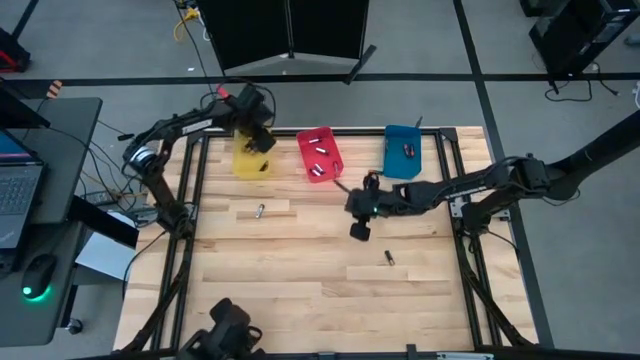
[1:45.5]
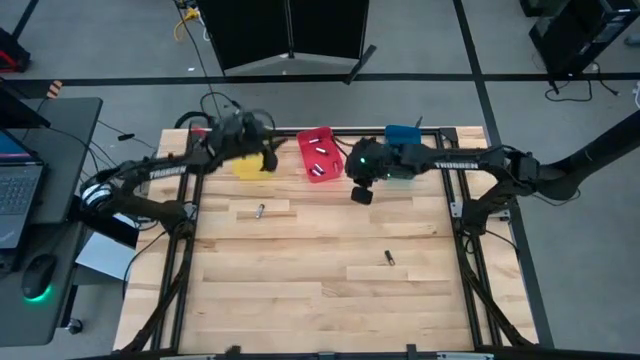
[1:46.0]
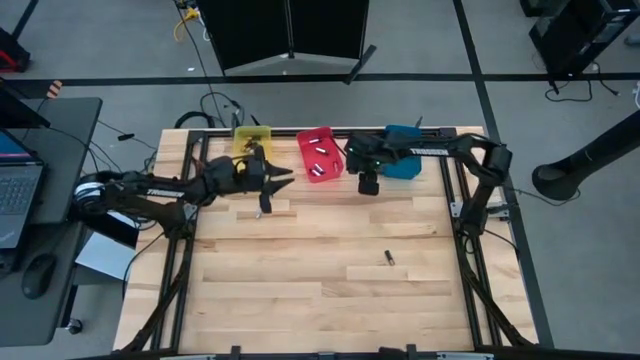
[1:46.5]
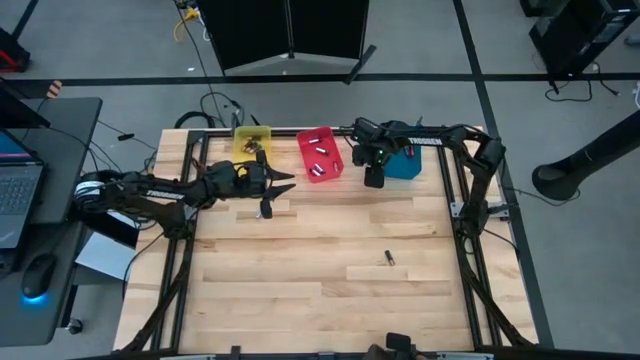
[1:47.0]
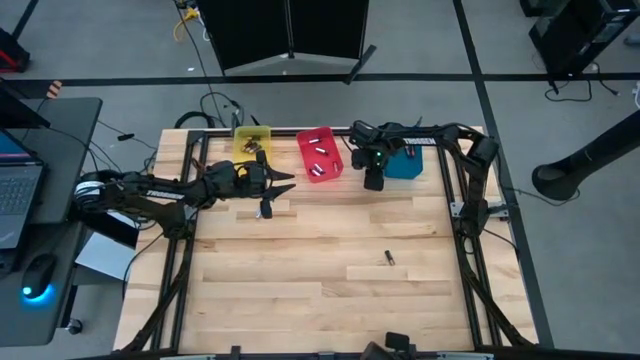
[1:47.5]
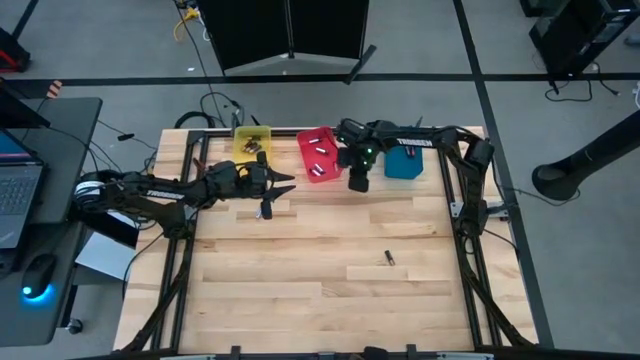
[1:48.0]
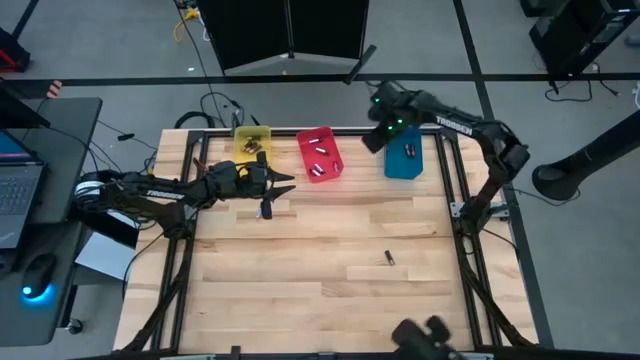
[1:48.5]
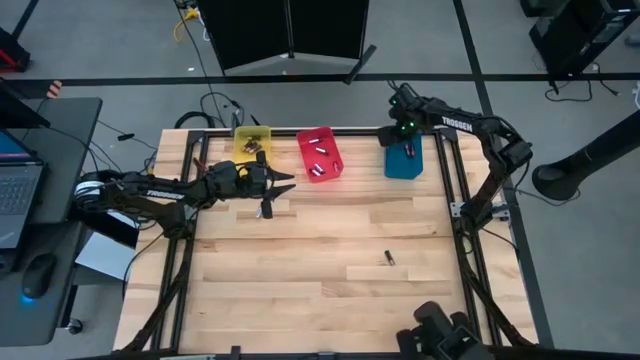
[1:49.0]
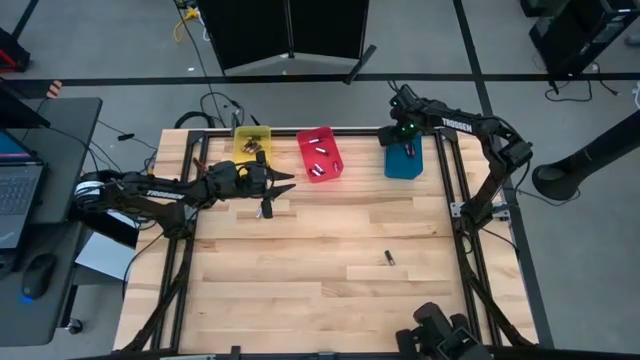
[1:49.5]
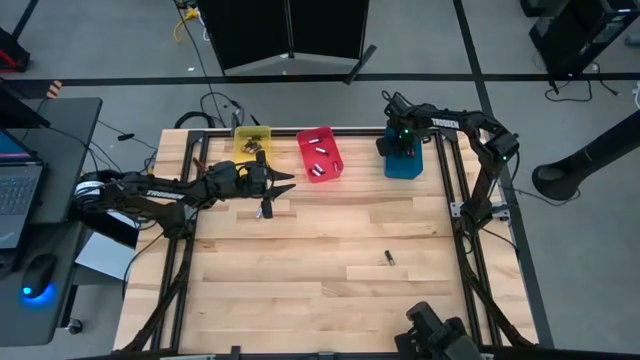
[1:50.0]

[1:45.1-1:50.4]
Task: Sort batteries
Put the orange battery into the blue bin

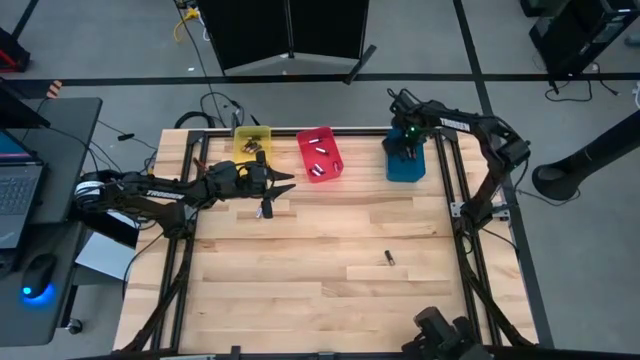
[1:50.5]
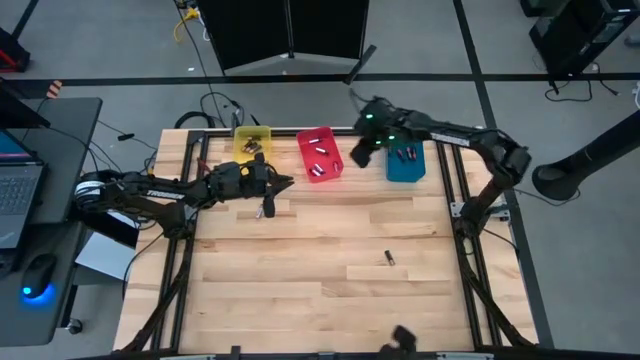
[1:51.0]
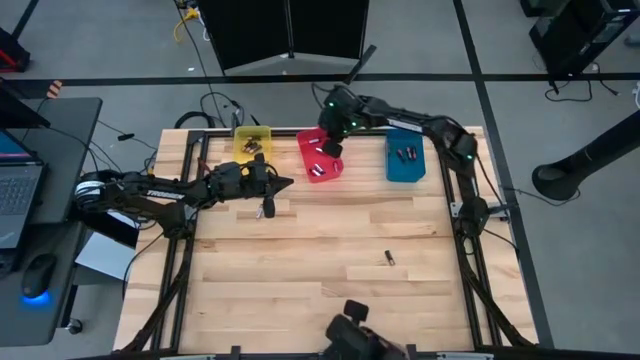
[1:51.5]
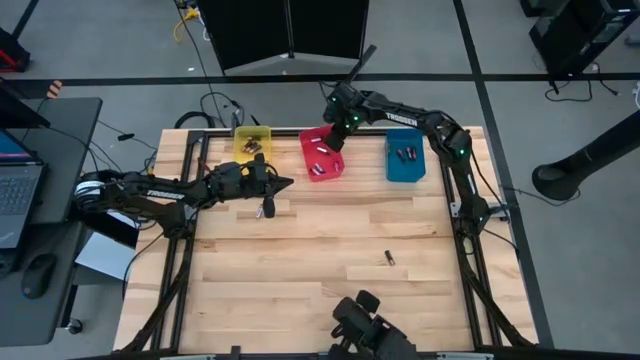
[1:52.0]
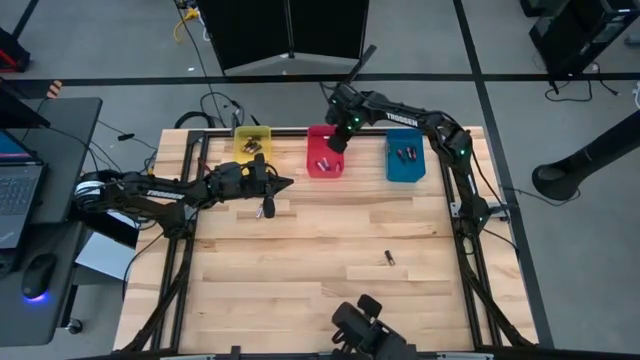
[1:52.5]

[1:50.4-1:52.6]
Adjust the red bin

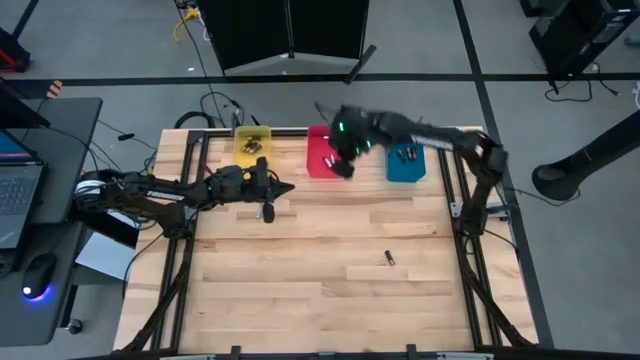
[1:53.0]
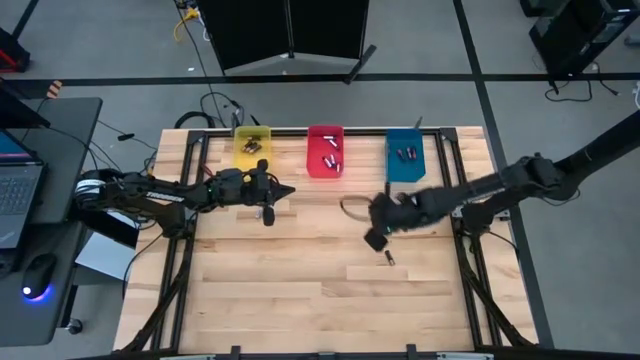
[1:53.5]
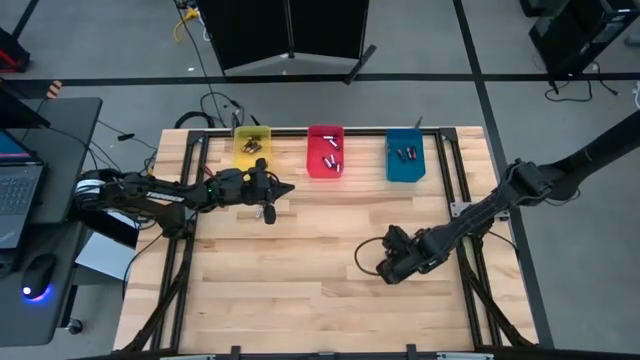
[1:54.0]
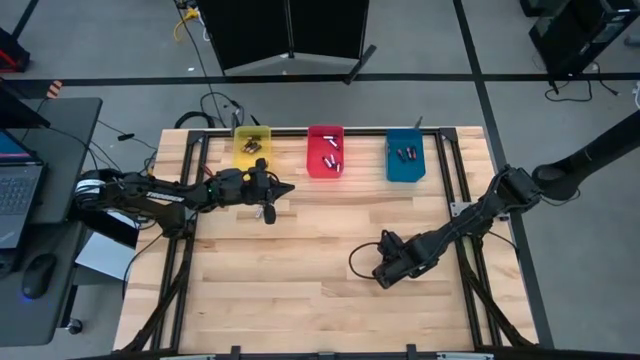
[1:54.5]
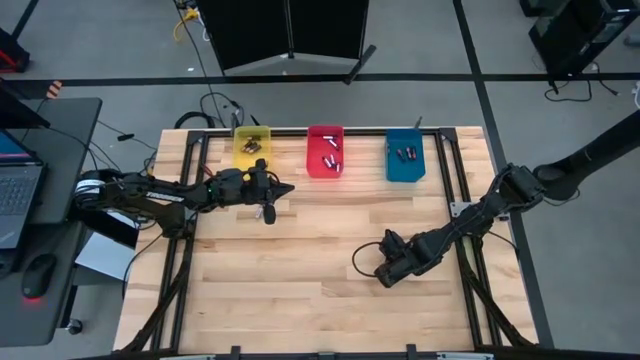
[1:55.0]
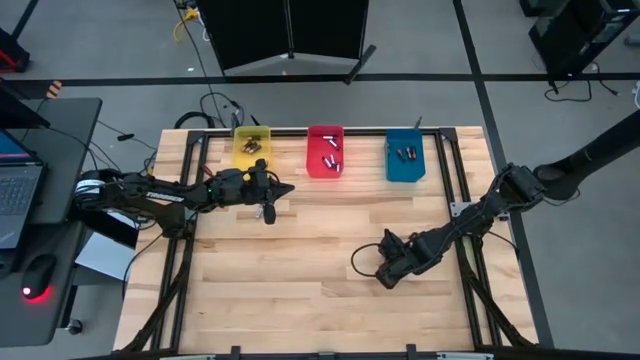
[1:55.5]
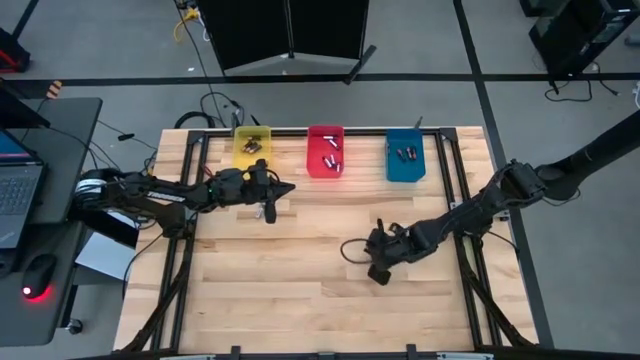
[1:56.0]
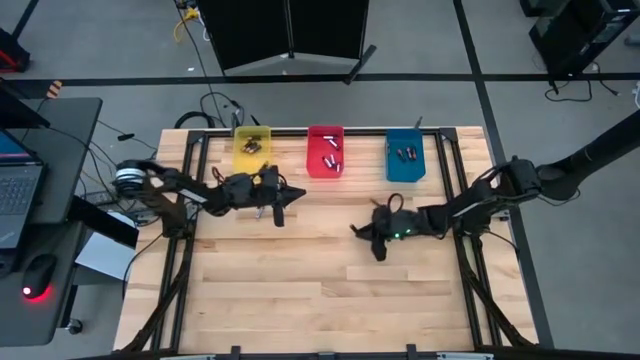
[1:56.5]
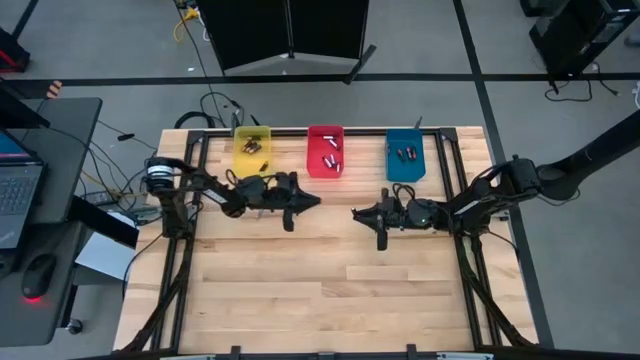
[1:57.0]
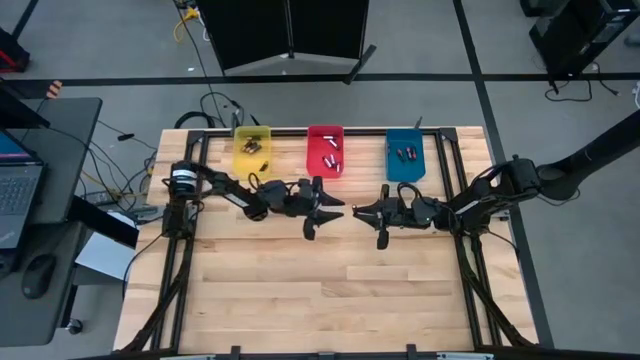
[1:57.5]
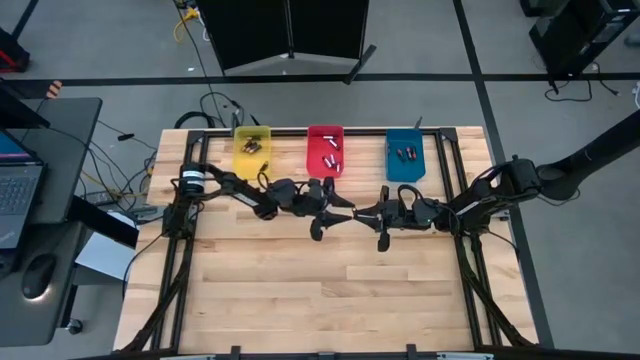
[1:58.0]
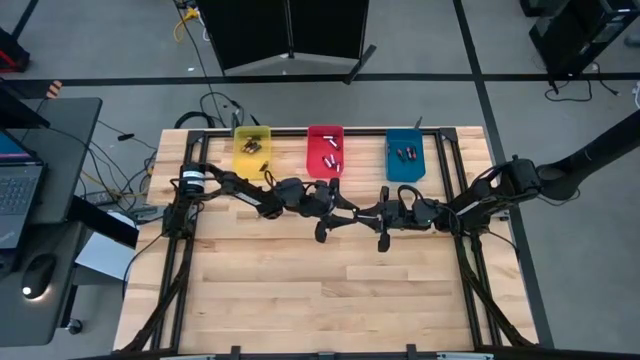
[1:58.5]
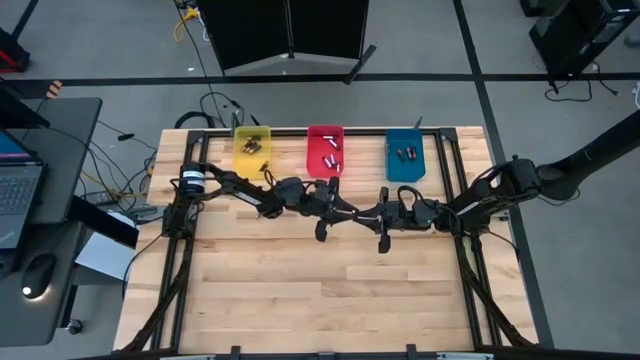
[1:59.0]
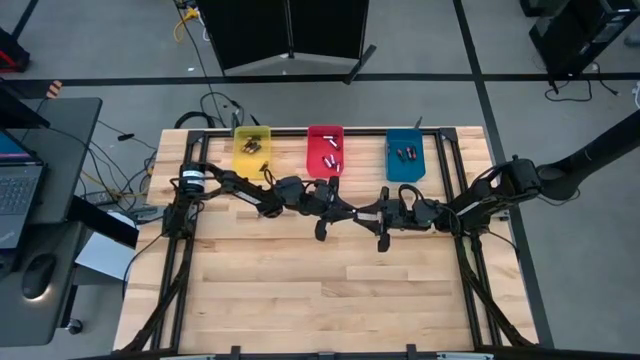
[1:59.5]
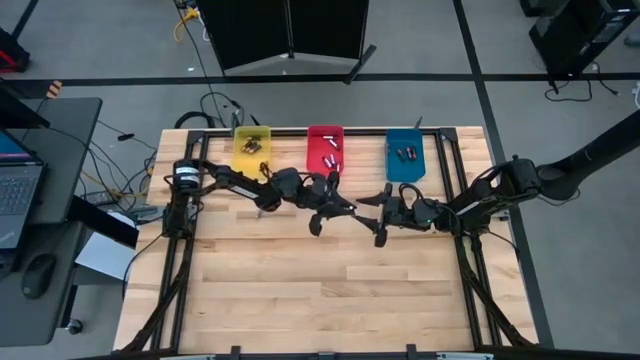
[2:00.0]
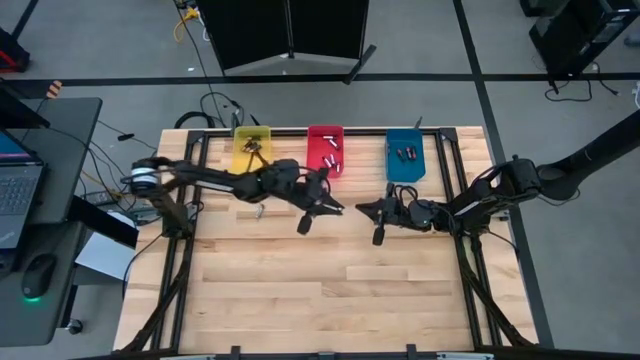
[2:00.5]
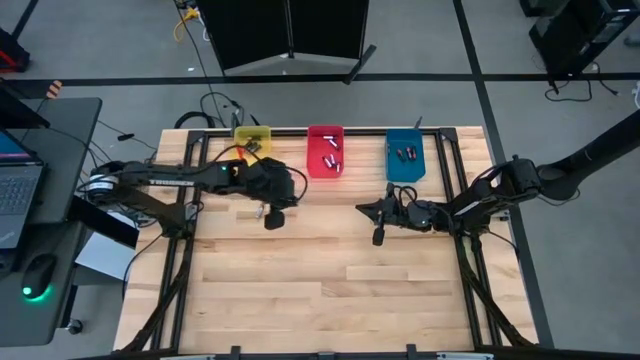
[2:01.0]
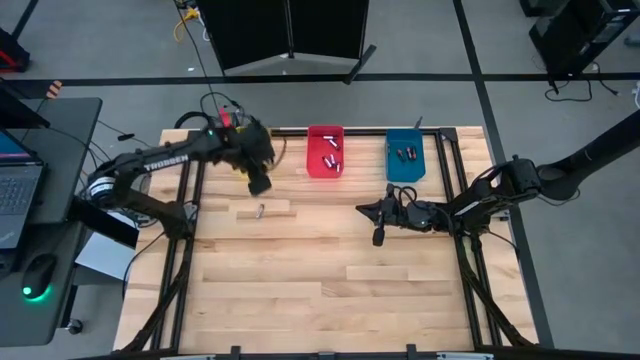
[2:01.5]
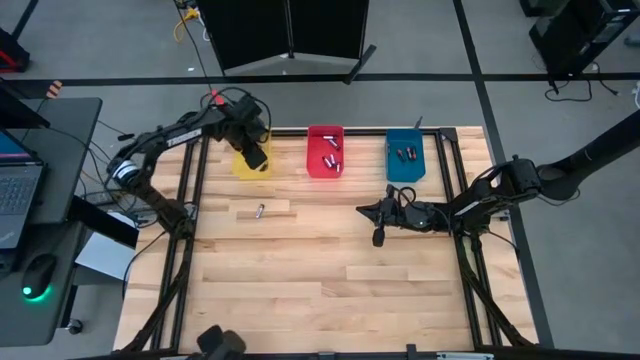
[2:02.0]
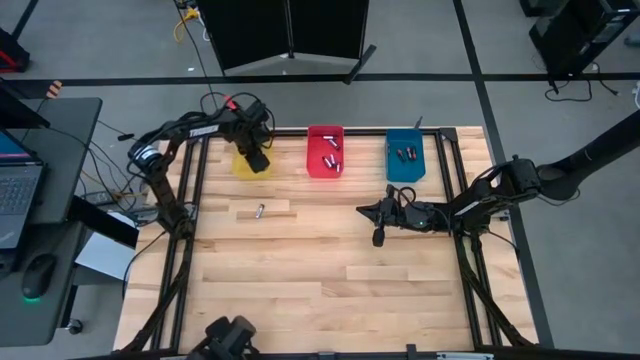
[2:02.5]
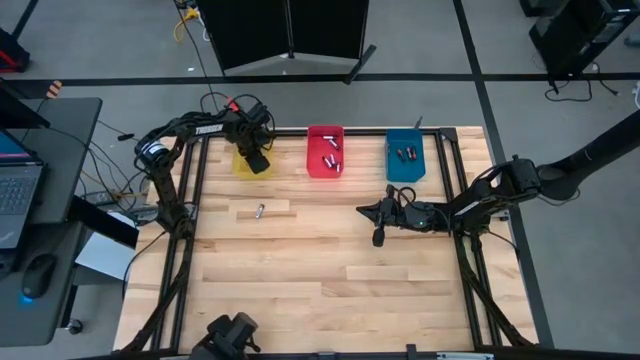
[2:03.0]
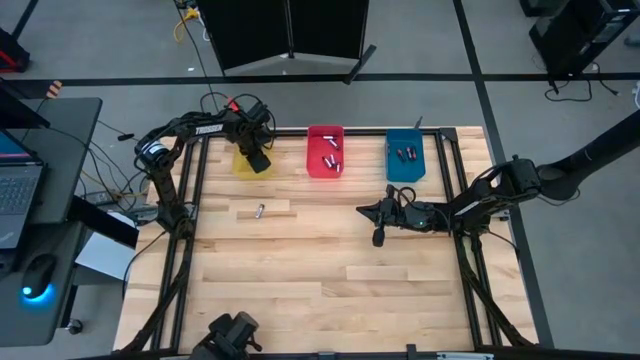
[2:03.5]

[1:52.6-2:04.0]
Put the brown battery into the yellow bin

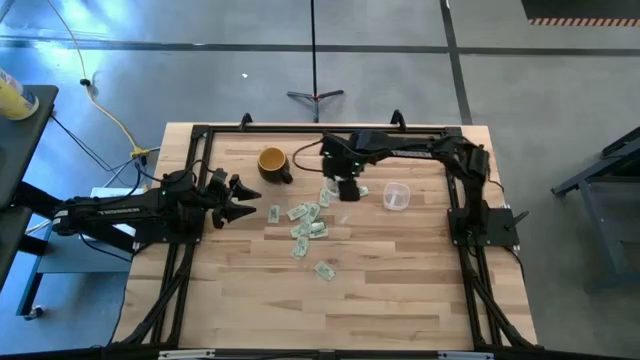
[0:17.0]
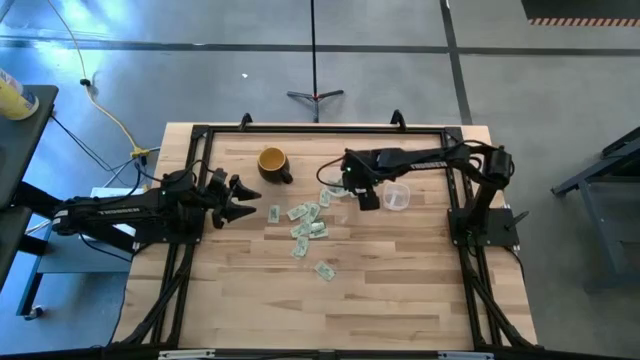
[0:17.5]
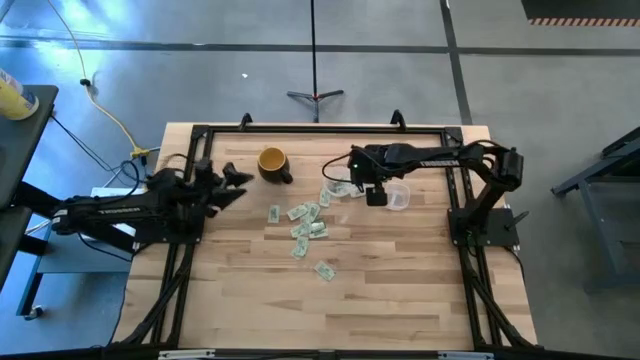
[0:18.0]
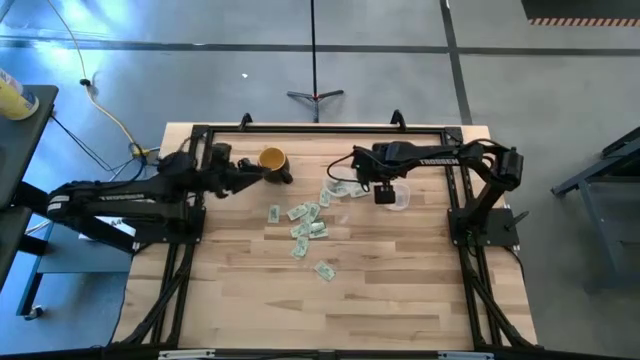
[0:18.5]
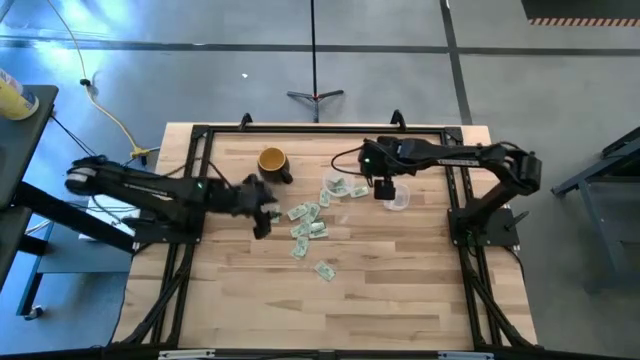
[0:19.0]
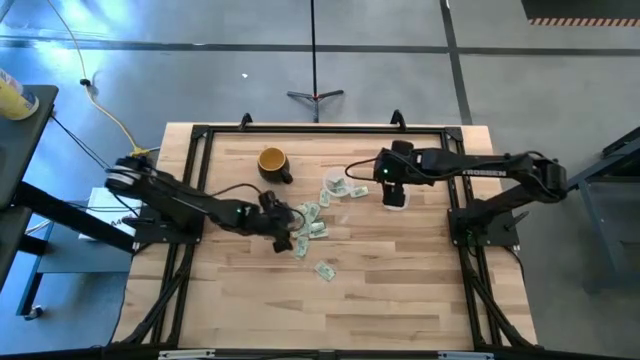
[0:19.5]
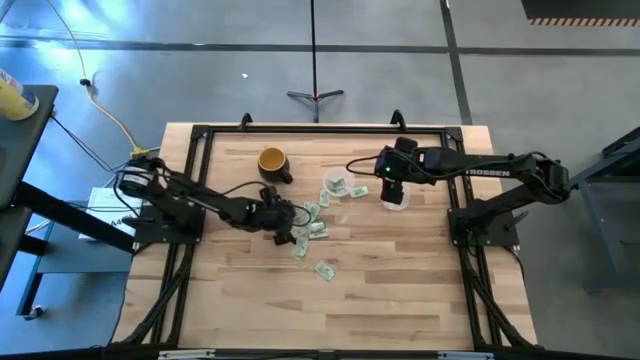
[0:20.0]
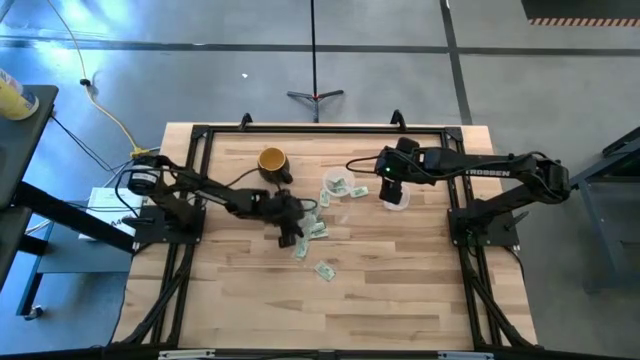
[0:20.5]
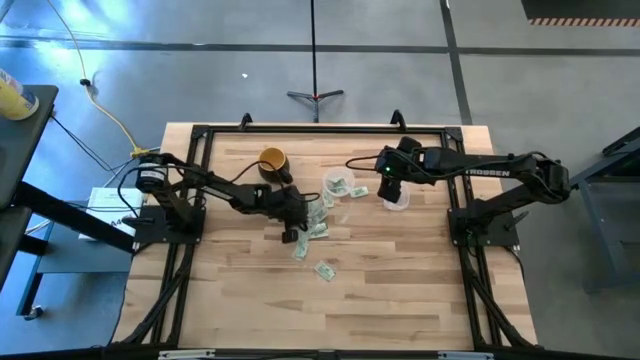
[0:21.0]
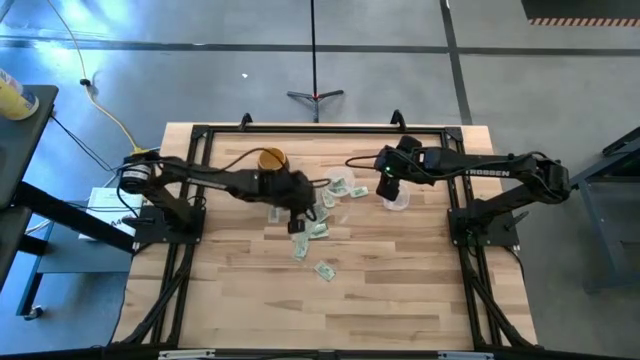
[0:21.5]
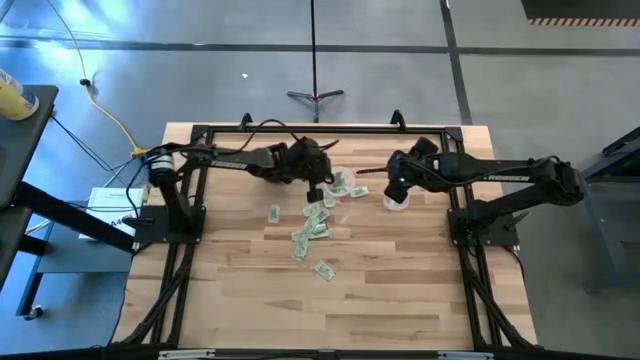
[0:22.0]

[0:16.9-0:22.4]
Task: Pick and place items into bin
Put the light green stevia packet into the left transparent bin
